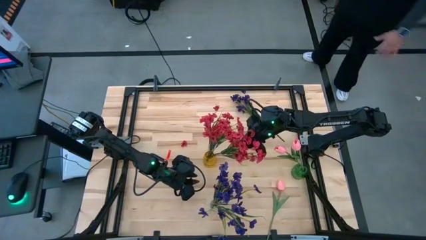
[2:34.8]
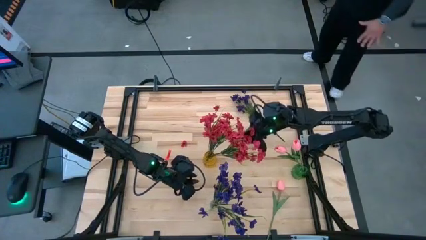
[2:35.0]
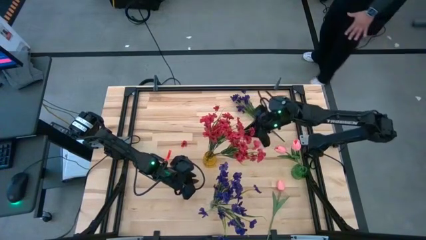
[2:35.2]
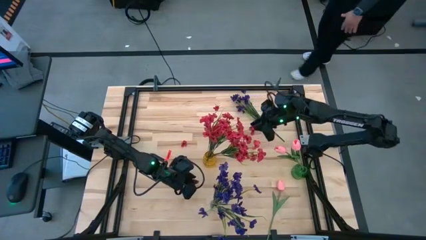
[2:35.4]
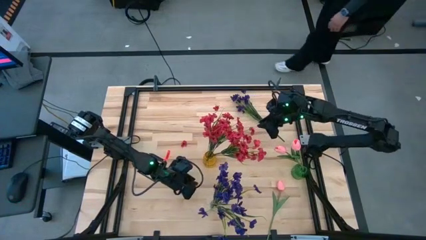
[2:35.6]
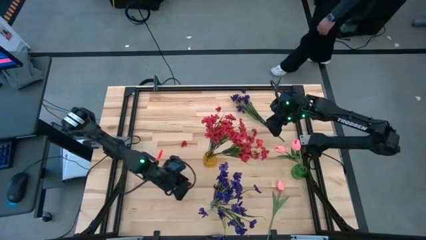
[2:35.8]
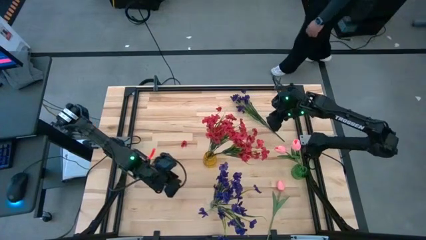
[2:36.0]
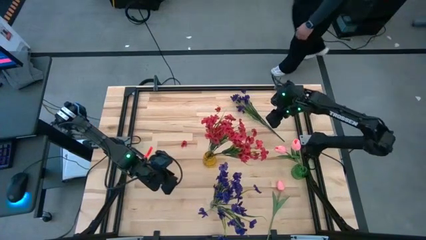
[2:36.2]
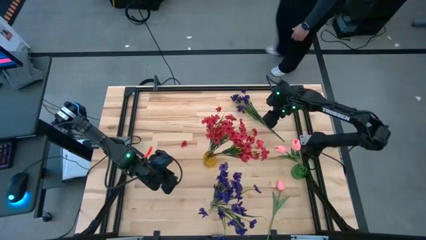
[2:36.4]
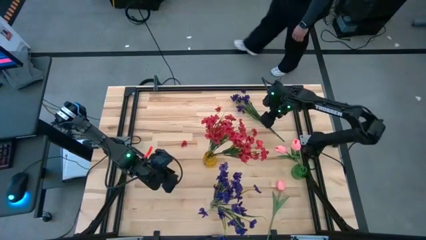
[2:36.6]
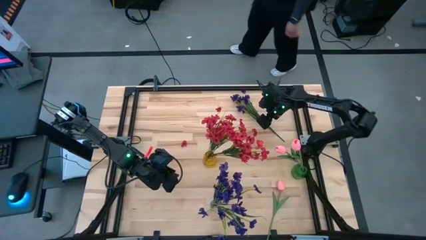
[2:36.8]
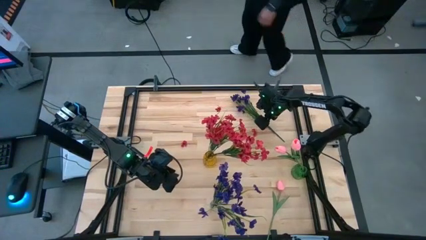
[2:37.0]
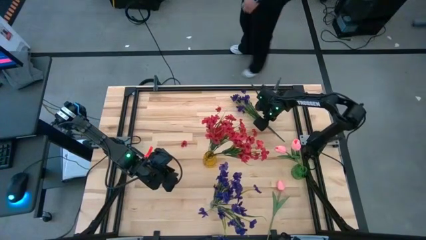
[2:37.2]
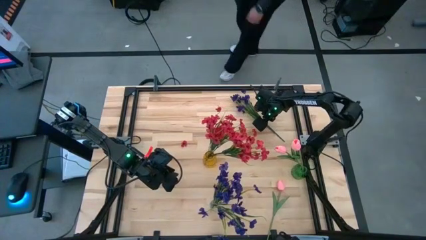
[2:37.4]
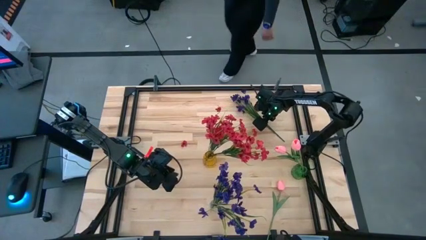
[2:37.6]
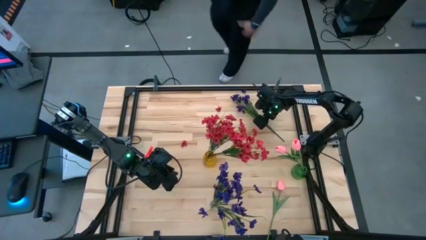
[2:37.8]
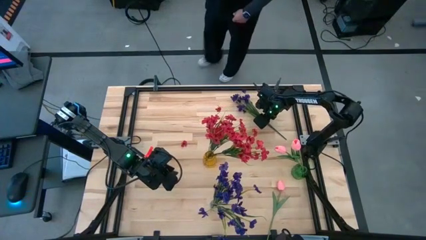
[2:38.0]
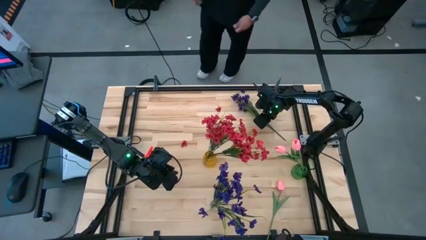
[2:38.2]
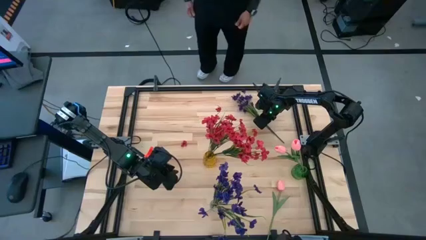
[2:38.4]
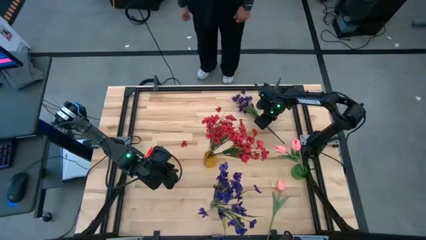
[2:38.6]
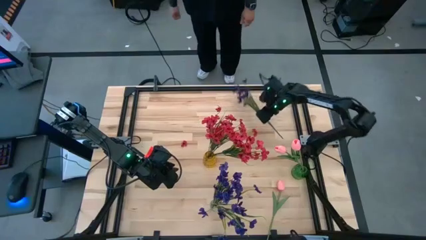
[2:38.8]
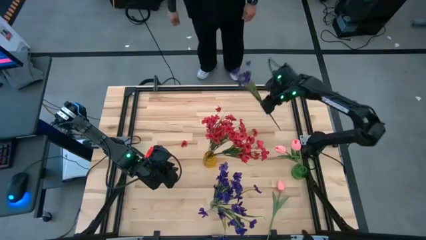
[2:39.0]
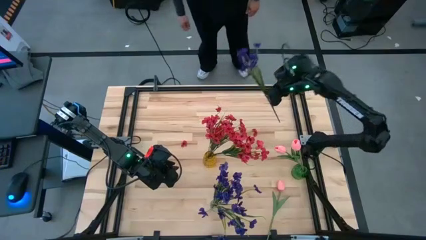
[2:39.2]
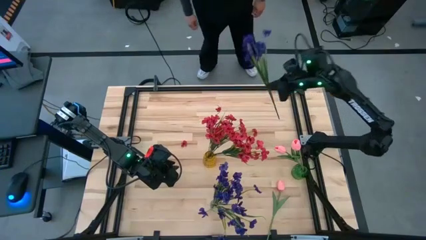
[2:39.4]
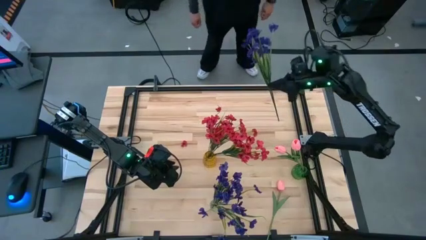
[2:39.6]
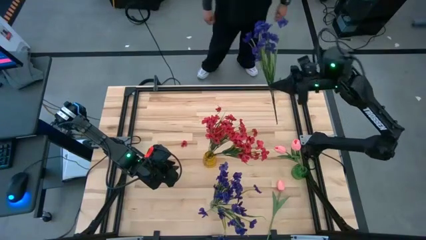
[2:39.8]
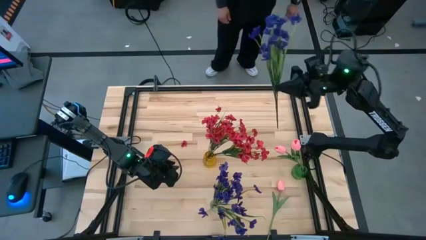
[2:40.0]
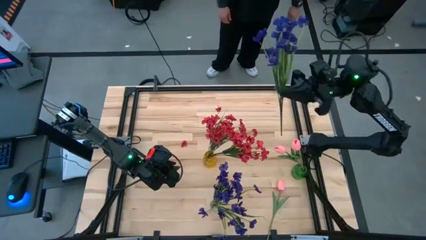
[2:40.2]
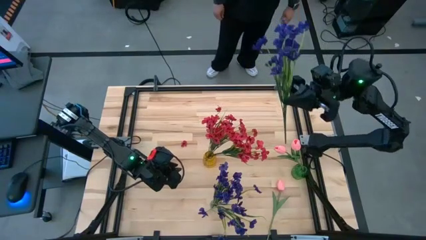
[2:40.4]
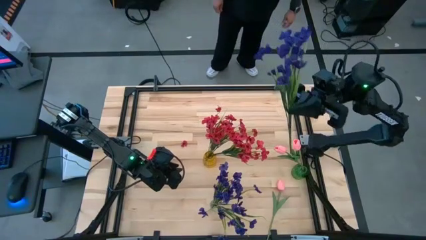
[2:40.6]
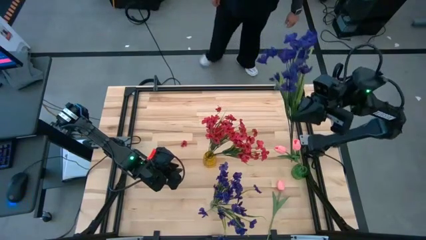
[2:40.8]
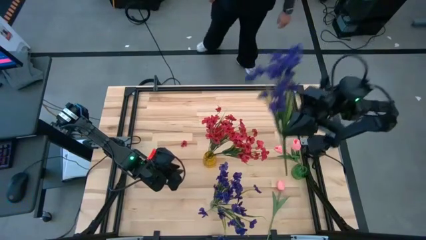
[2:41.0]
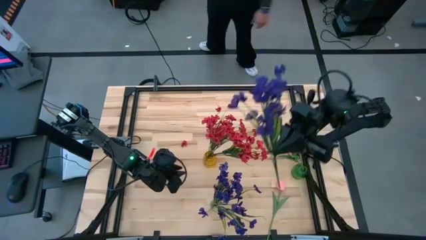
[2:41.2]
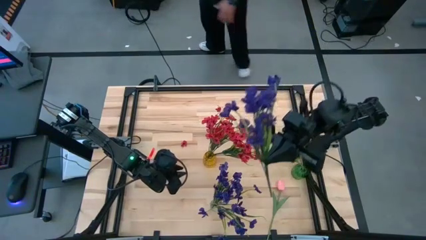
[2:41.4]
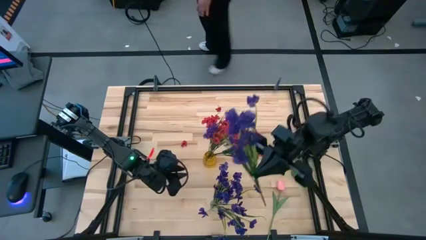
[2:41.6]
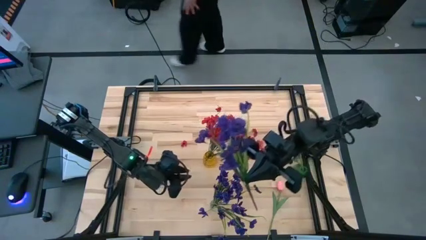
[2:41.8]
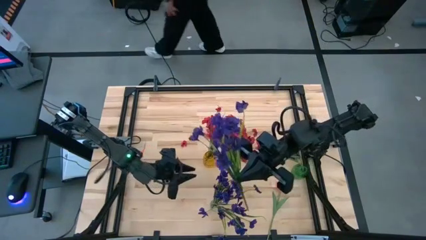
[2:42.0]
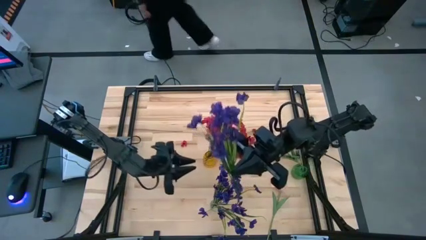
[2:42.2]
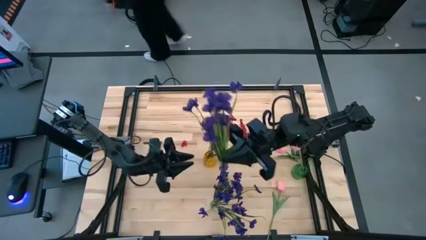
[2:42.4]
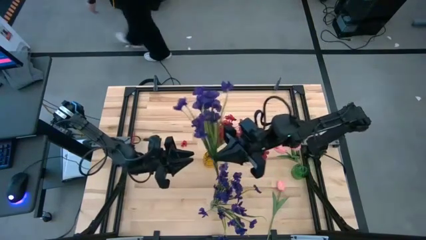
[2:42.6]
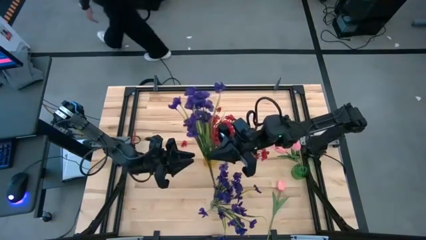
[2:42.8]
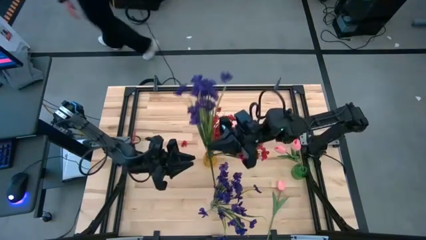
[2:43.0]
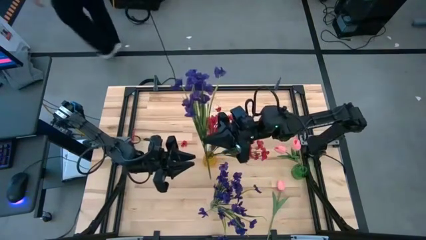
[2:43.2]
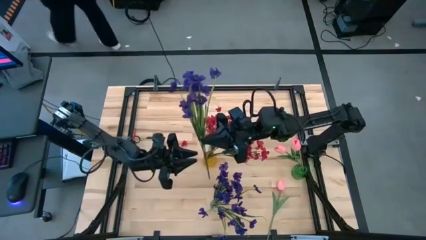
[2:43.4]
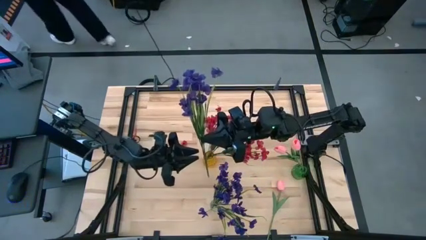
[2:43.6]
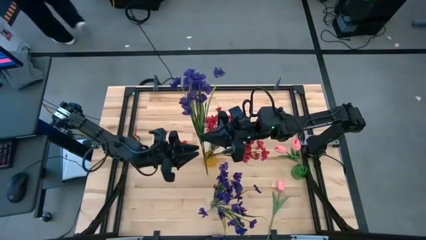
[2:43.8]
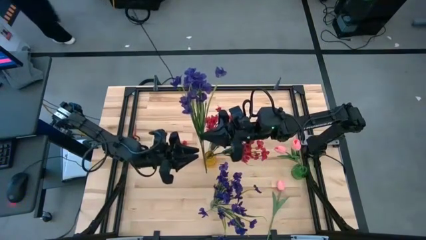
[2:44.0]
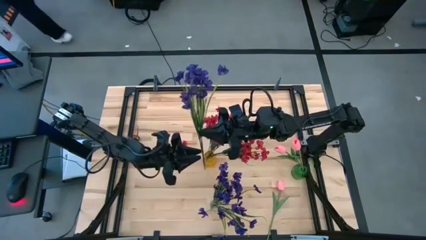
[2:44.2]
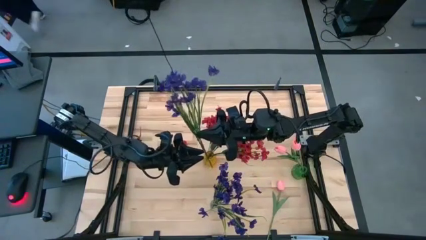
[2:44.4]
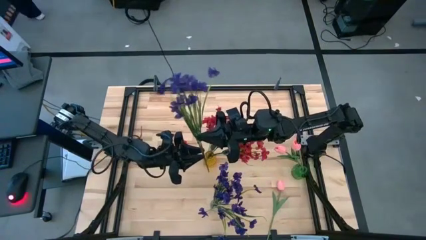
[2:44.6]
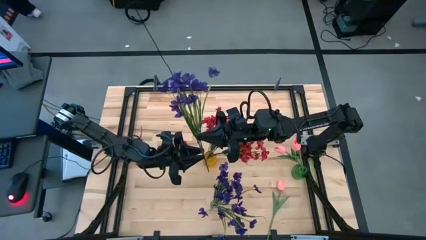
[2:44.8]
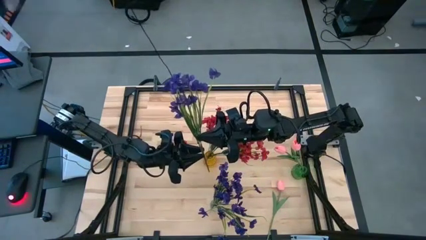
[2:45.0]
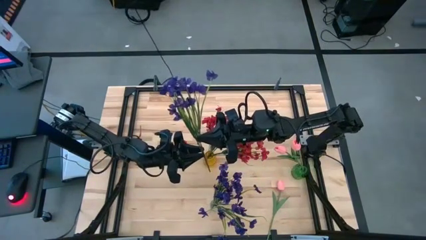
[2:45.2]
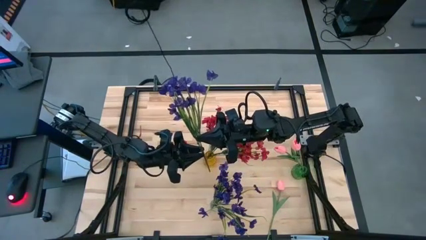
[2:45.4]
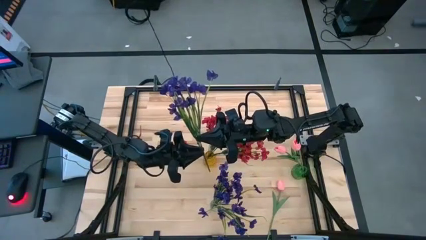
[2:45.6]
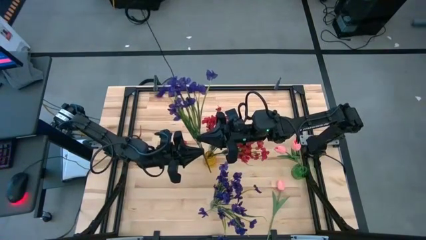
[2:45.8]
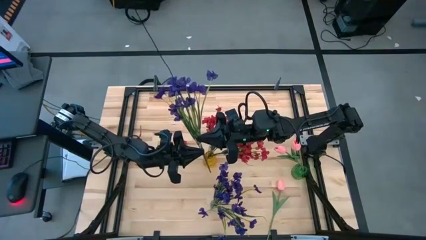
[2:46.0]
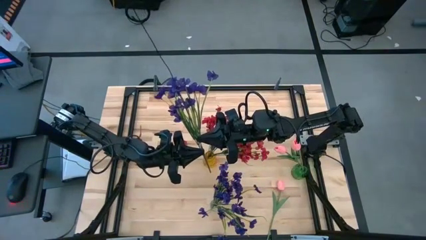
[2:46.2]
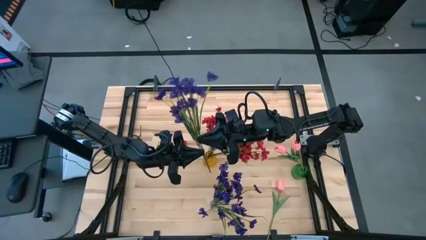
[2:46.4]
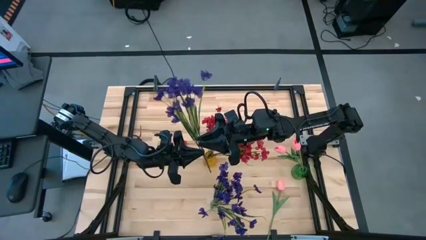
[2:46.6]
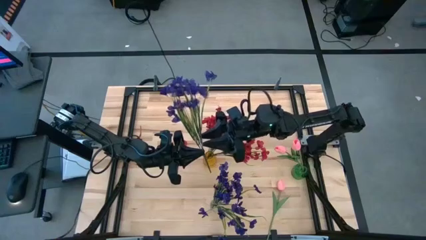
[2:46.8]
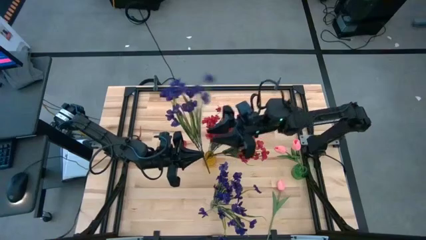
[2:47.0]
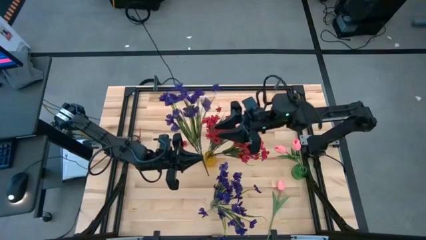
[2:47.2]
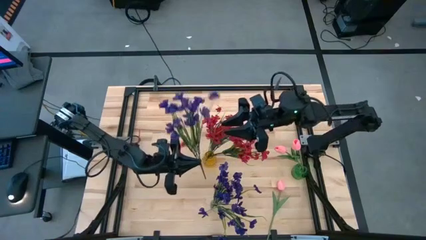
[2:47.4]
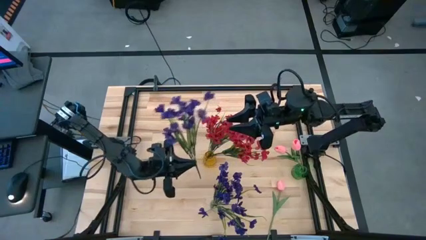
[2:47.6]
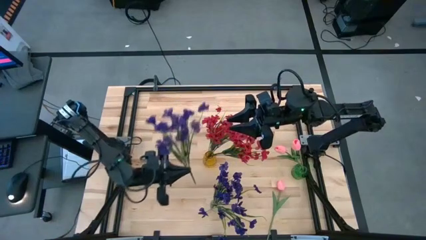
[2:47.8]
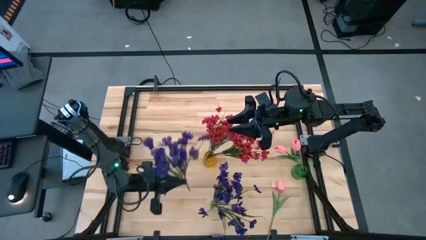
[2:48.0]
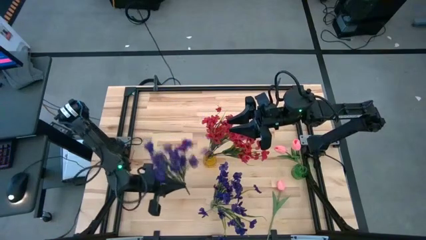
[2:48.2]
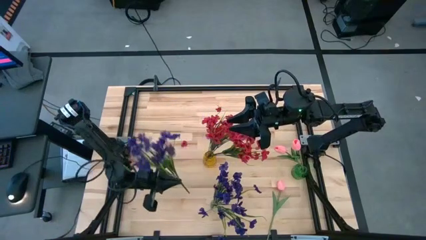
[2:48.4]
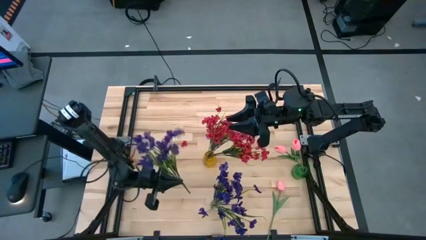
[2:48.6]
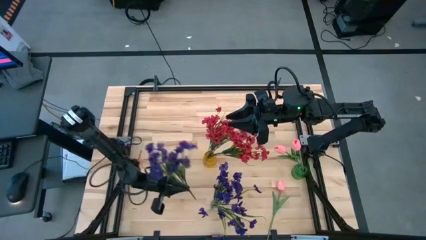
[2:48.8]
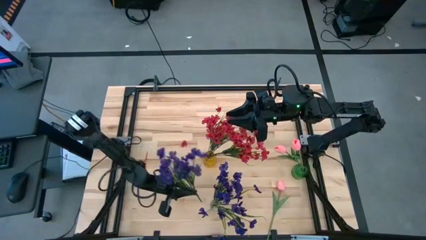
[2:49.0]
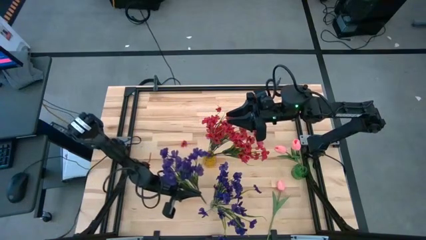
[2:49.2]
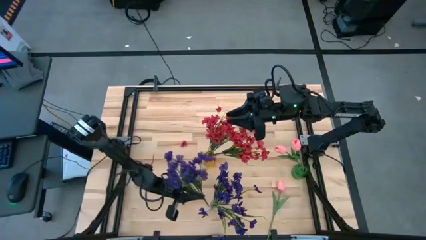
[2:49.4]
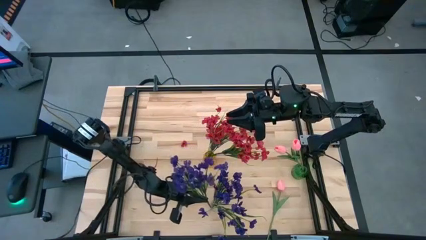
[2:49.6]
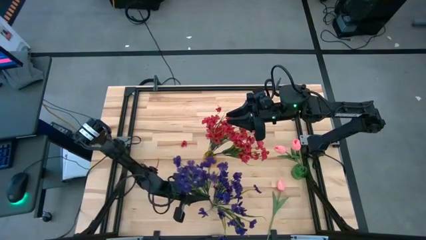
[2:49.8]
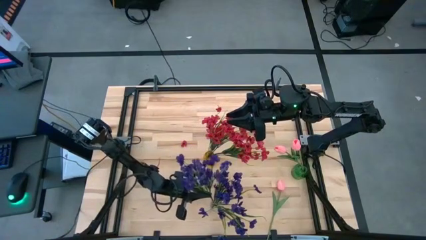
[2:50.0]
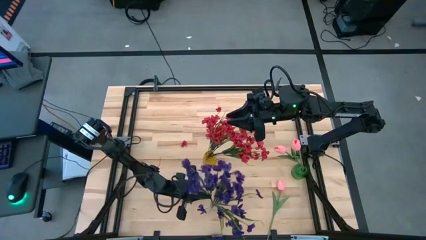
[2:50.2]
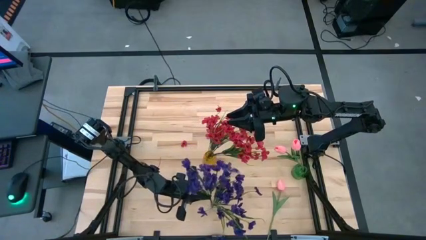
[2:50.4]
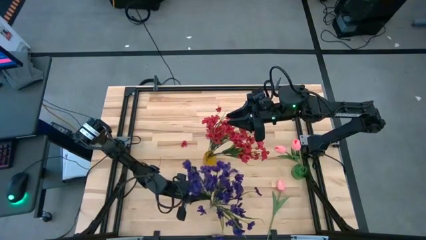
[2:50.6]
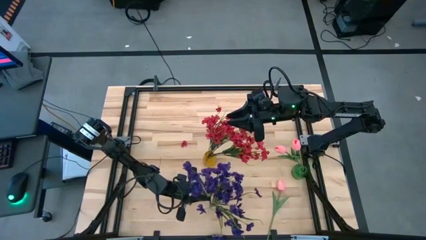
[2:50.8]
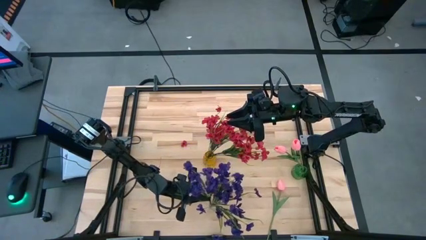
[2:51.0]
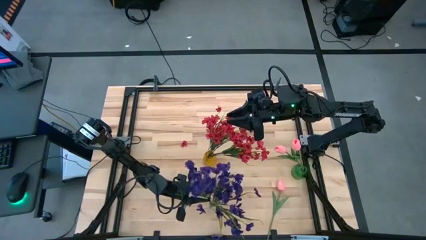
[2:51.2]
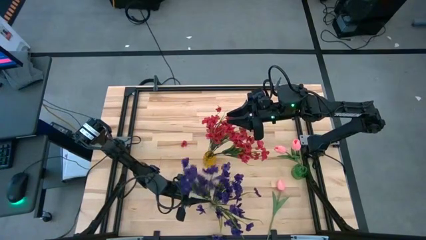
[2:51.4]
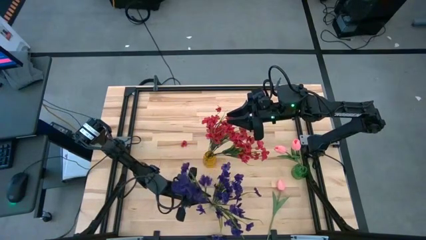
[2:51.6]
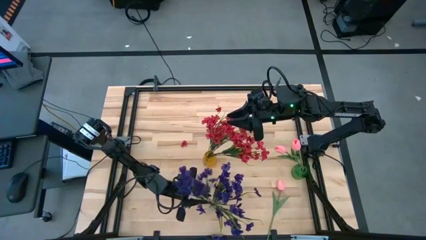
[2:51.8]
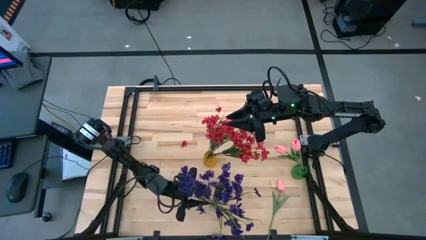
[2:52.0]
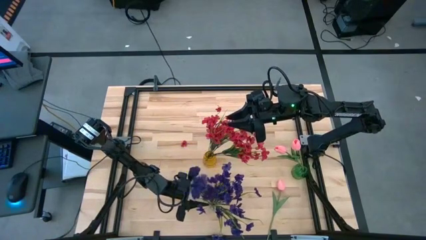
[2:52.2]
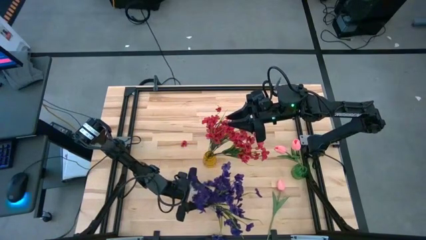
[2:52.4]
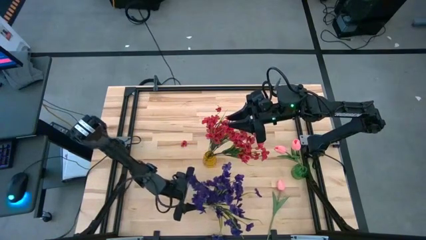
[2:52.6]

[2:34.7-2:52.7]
Task: Sort flowers into vase by color
Put the purple flower into the transparent vase
